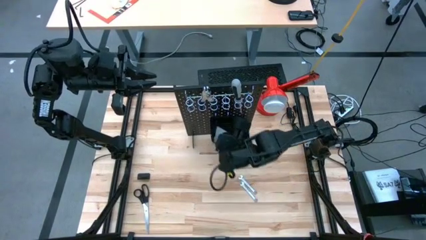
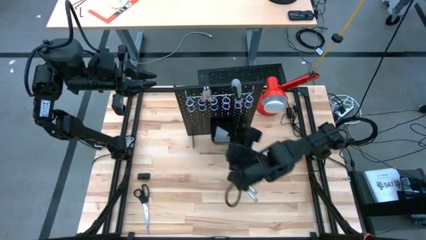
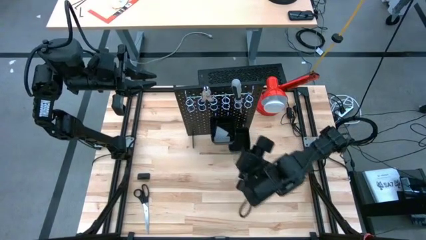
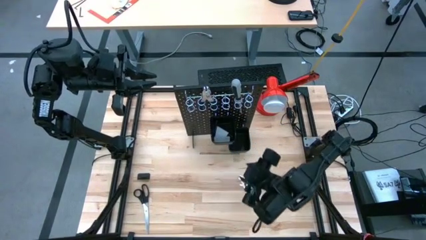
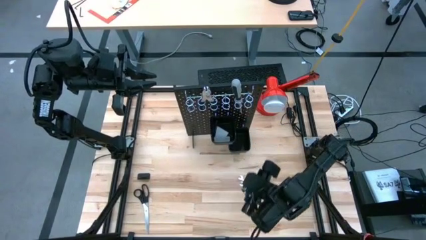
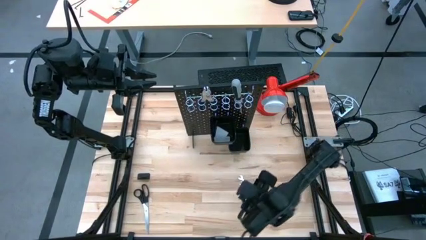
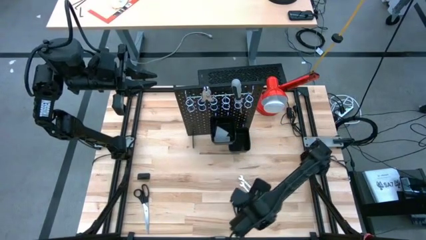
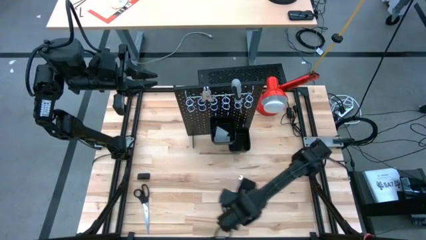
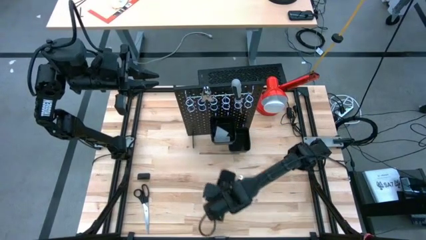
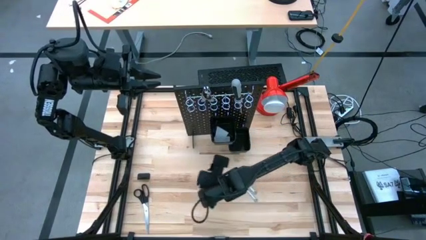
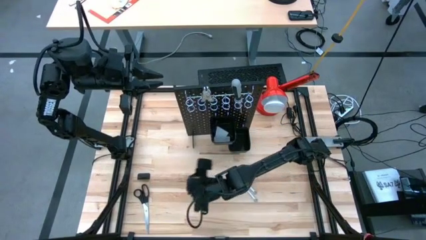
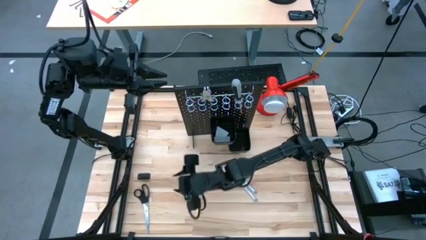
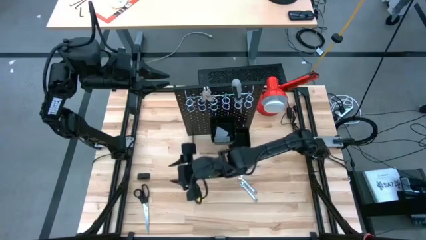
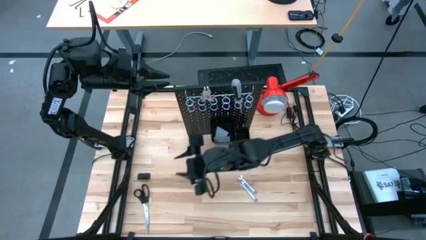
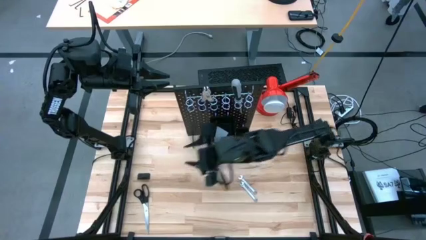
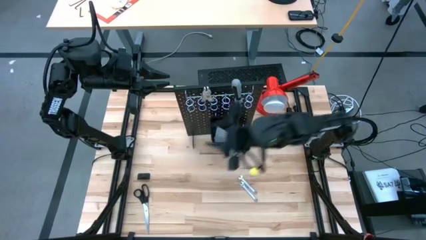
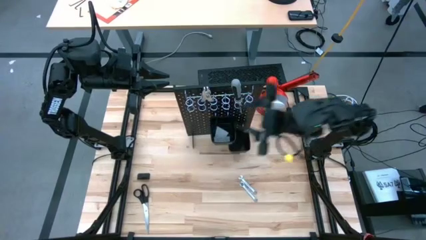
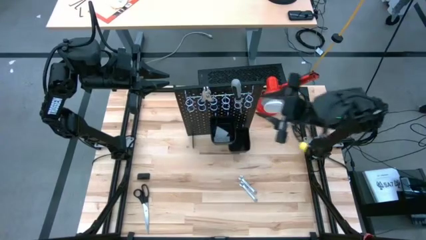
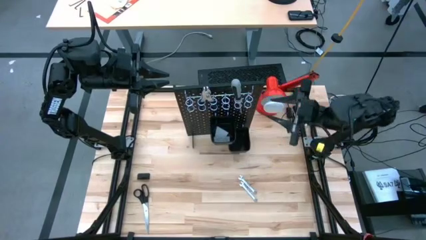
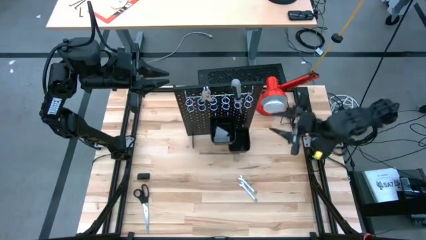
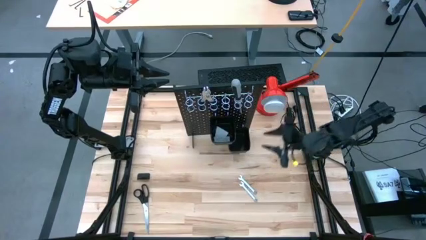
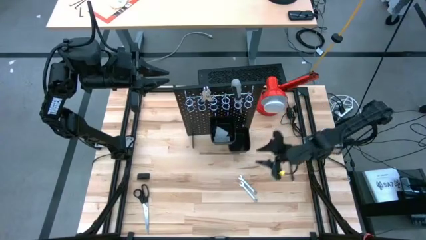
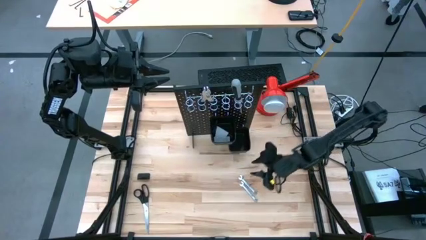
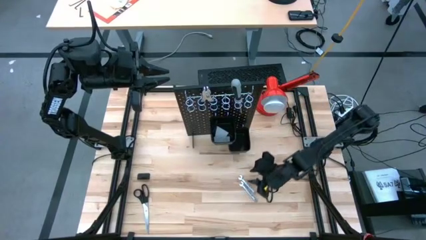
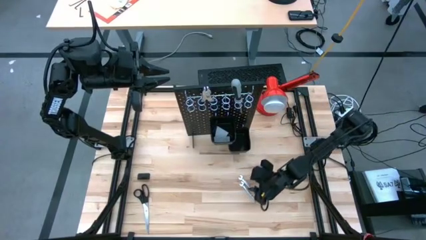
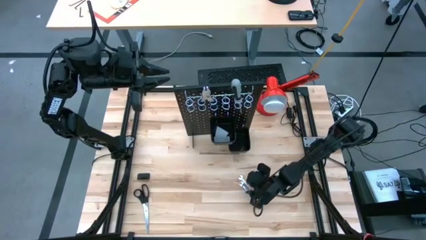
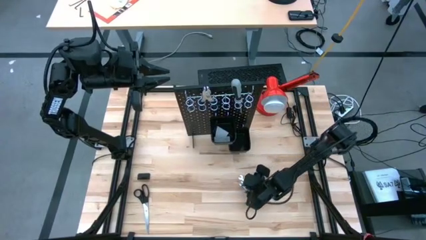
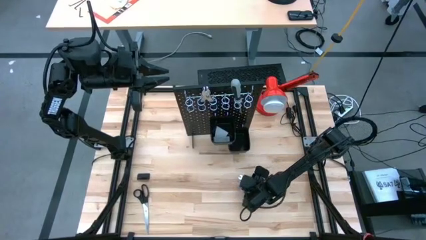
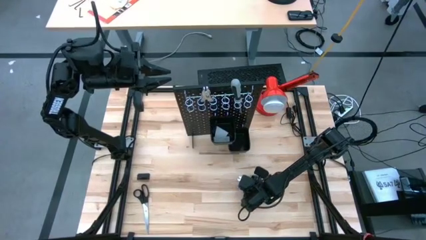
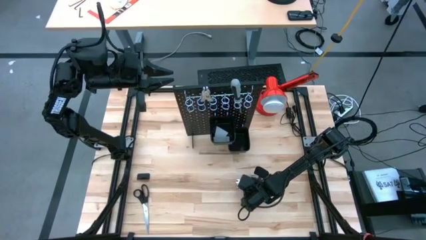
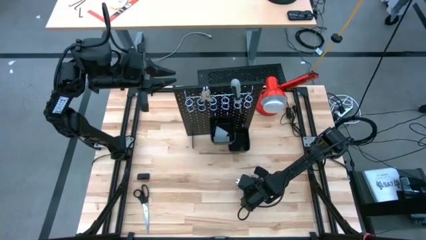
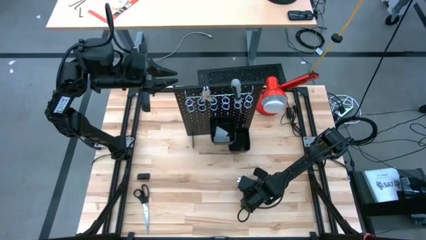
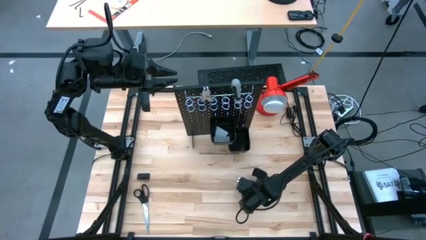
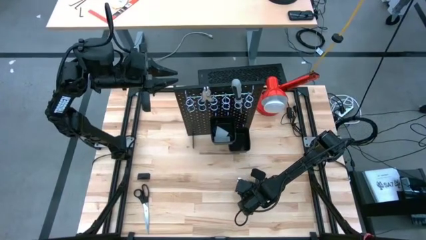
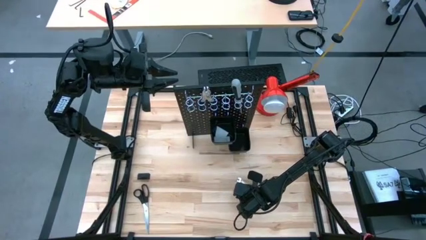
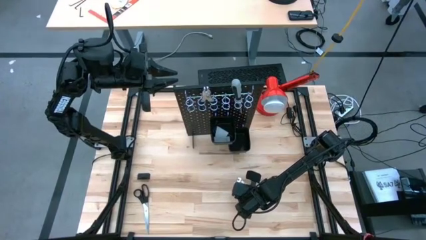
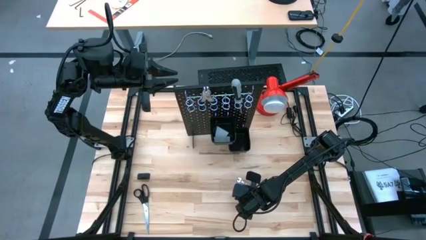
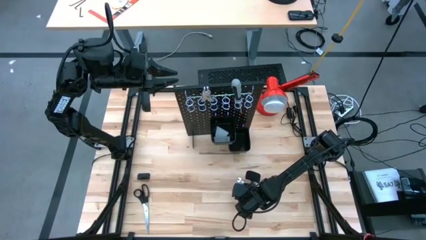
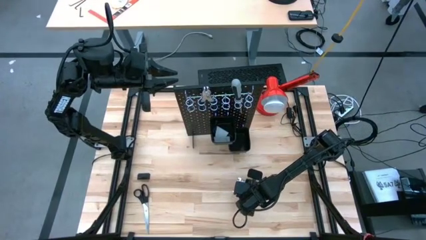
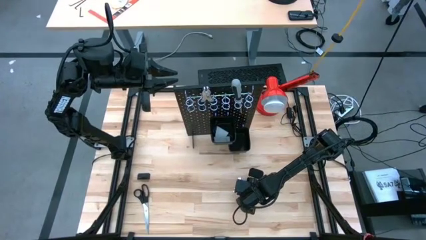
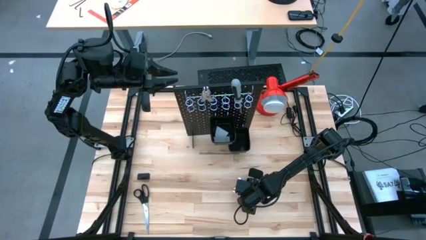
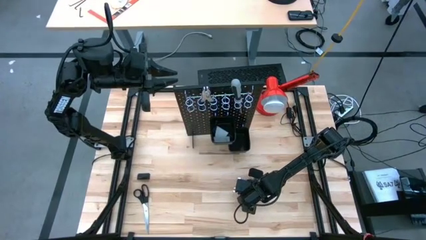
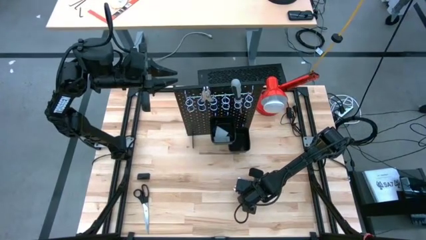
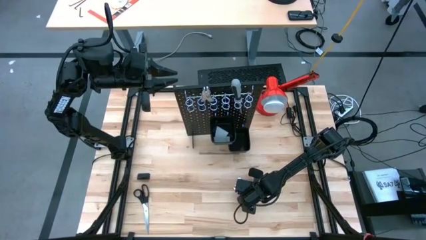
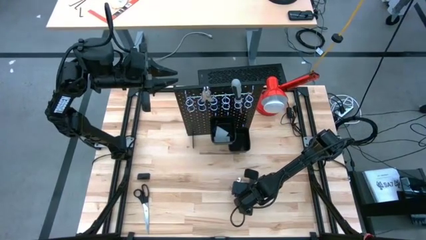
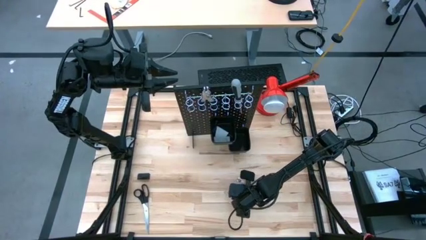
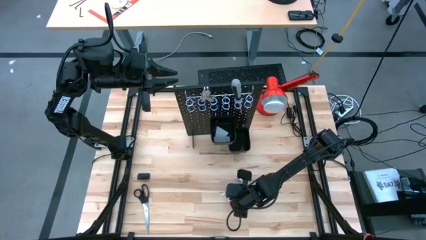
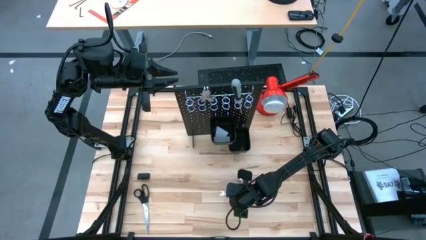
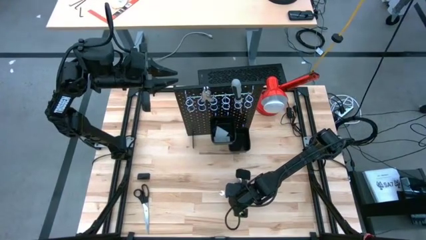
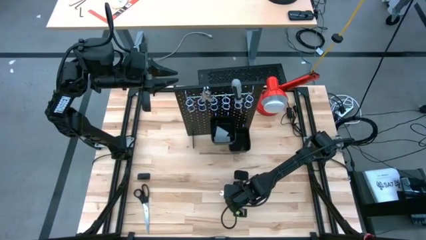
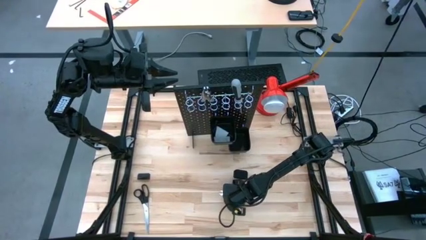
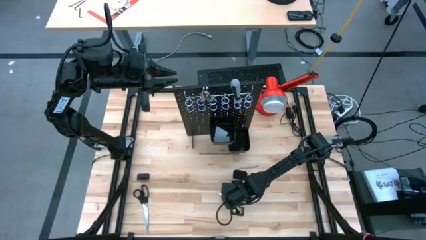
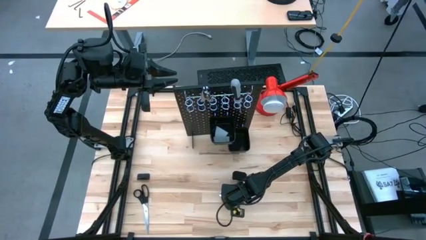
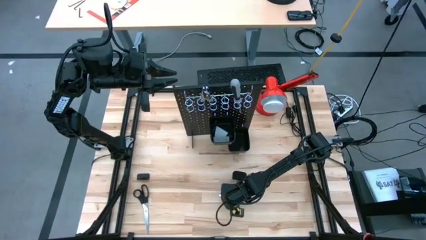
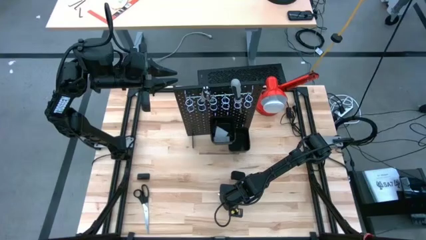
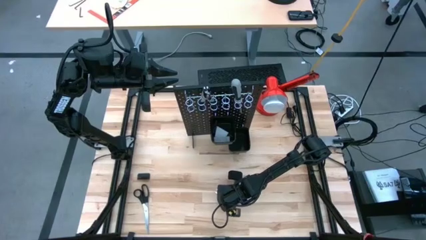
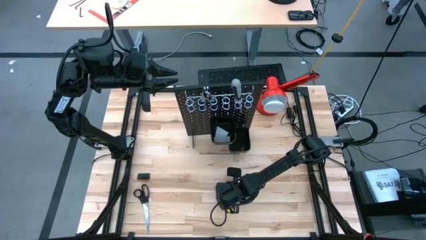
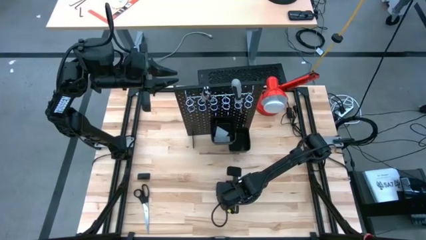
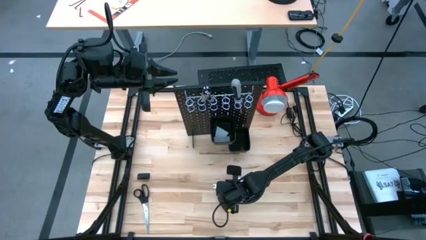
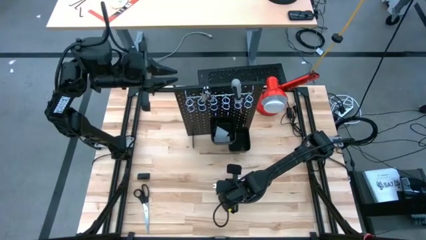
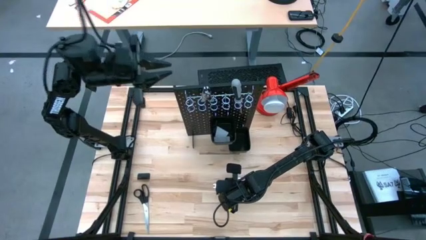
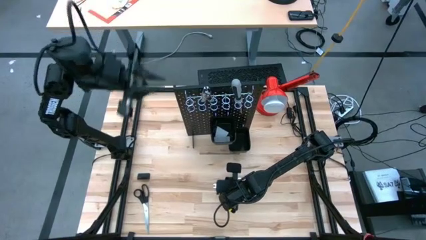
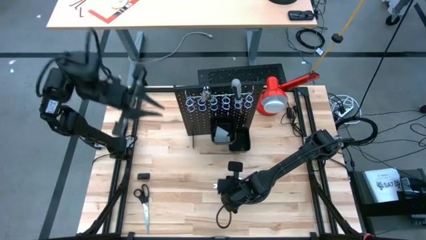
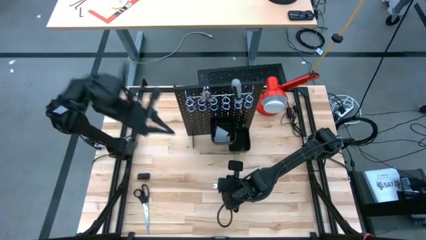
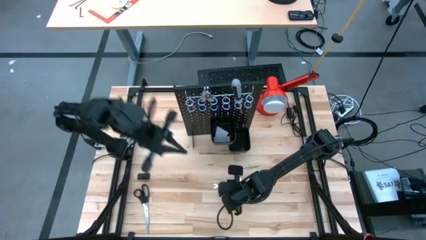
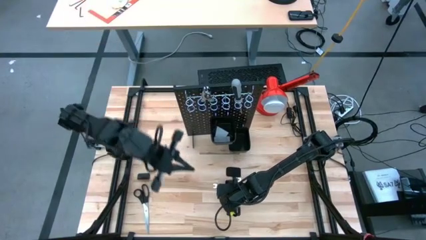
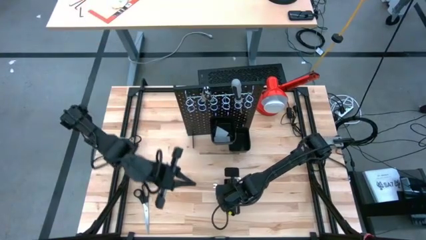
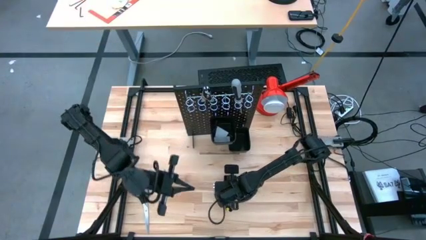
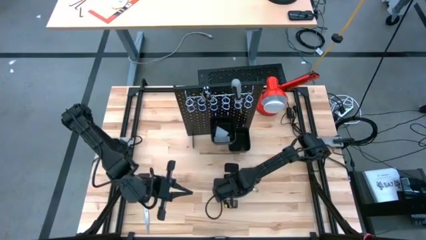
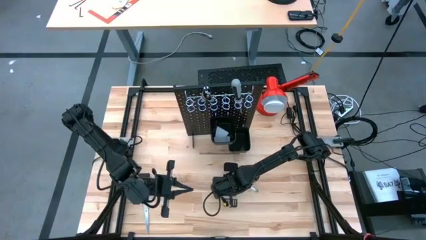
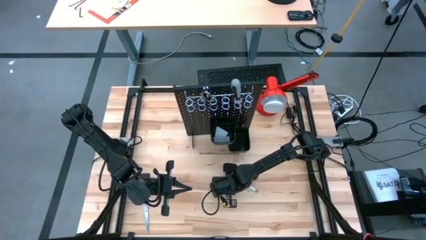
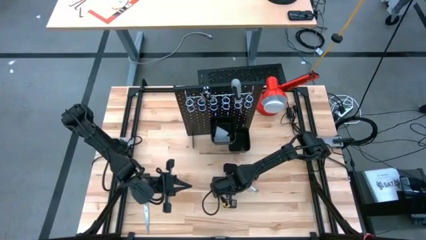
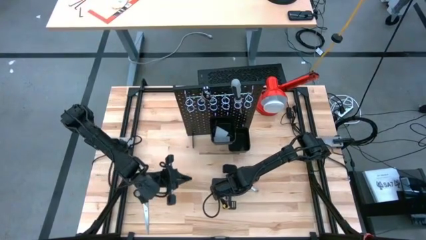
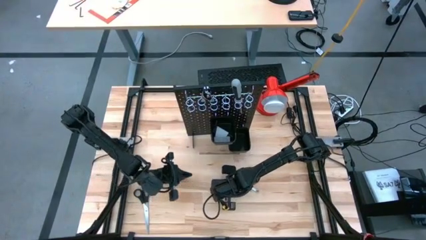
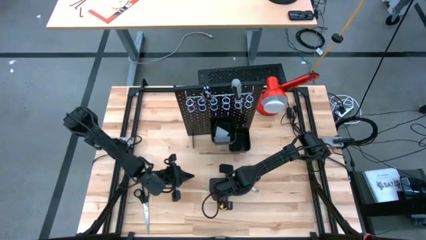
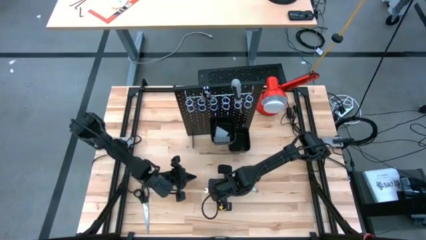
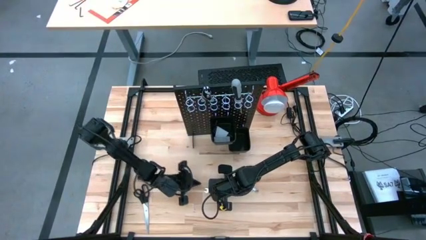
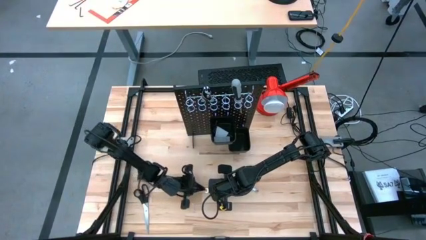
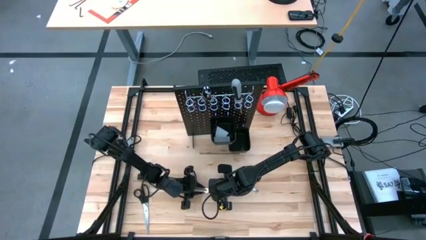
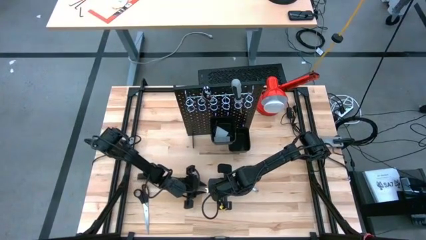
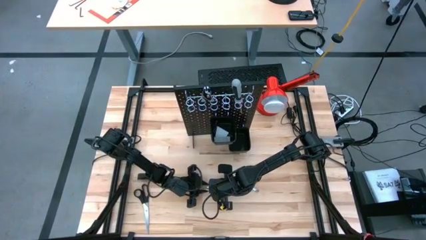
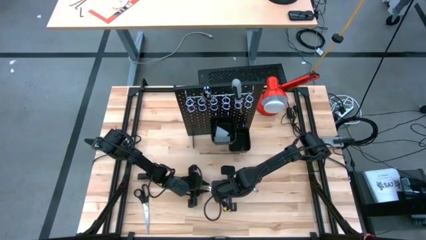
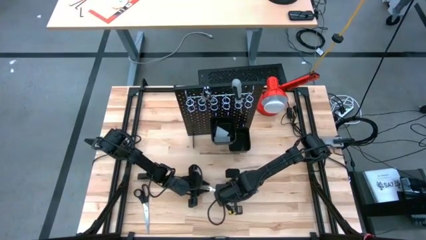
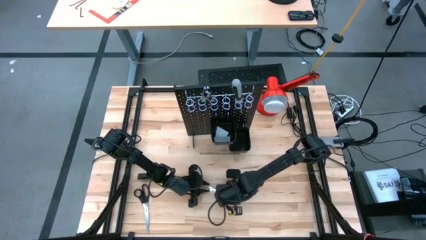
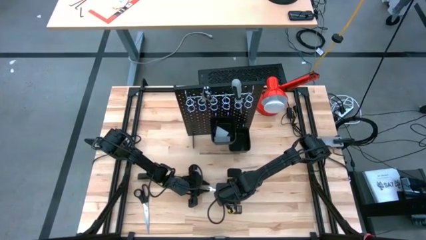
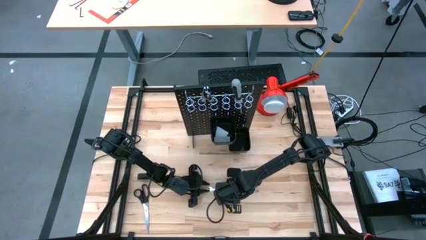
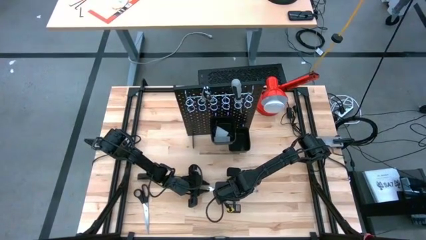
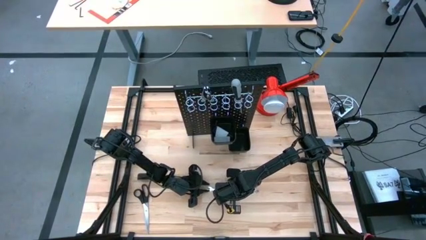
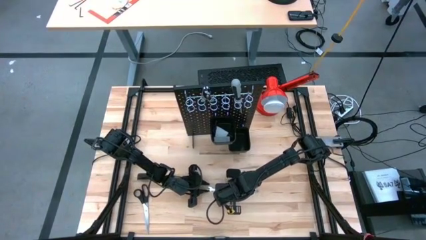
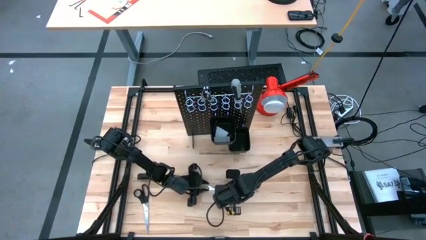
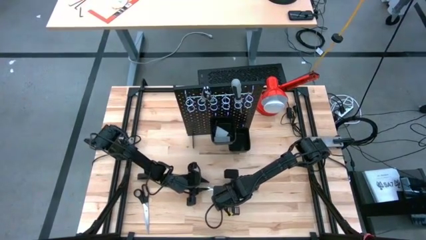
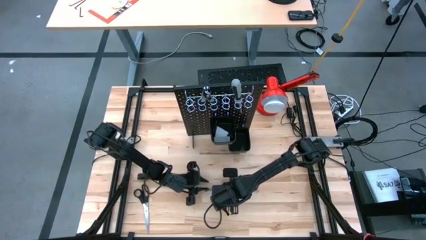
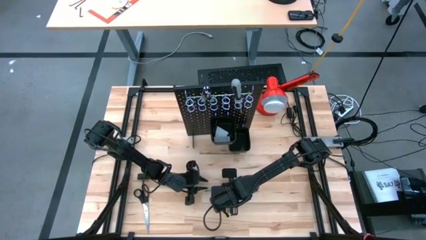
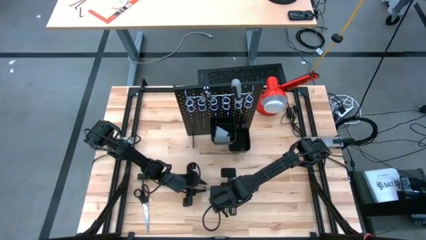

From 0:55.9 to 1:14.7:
Task: Hang tools onto peg board
Hang the wrench on the pegboard
